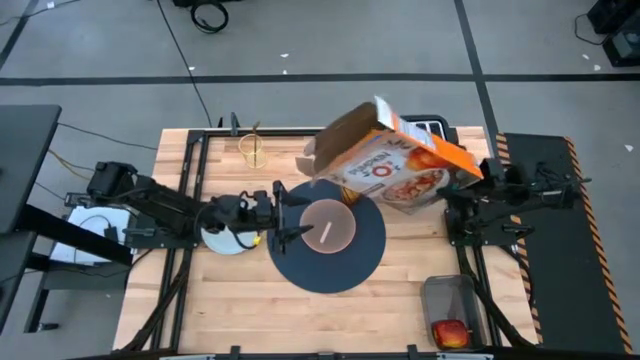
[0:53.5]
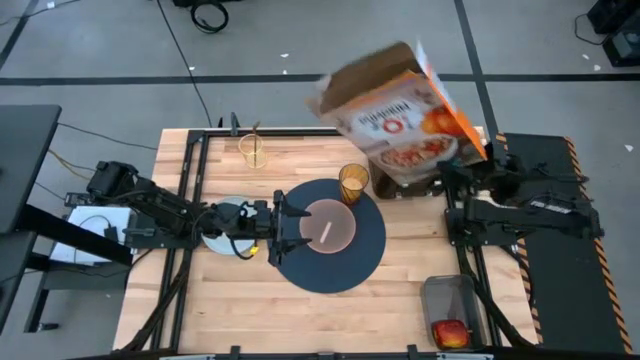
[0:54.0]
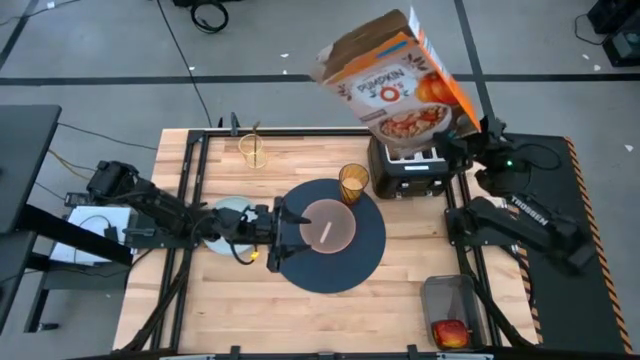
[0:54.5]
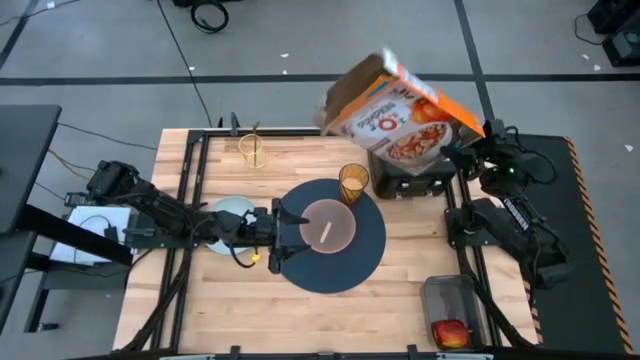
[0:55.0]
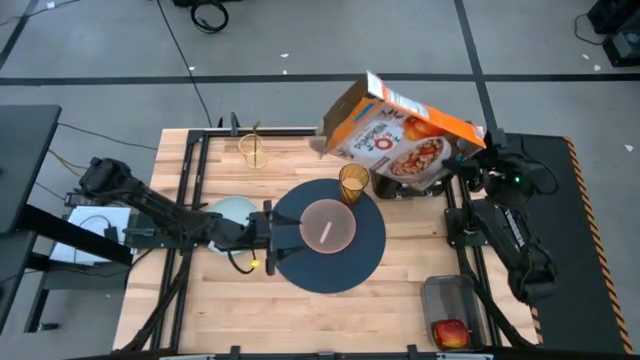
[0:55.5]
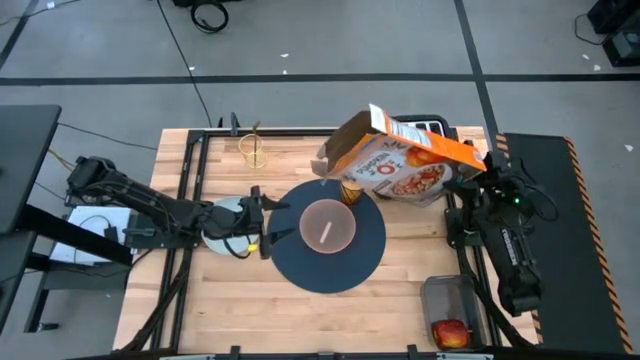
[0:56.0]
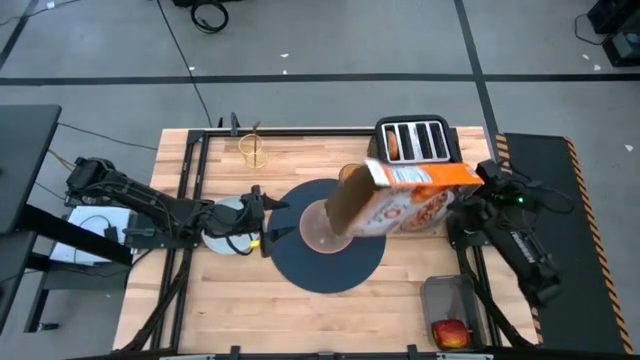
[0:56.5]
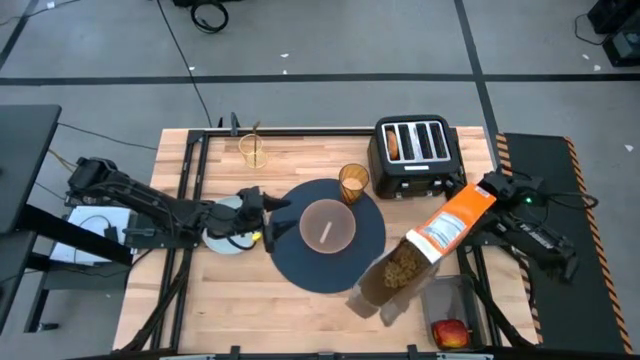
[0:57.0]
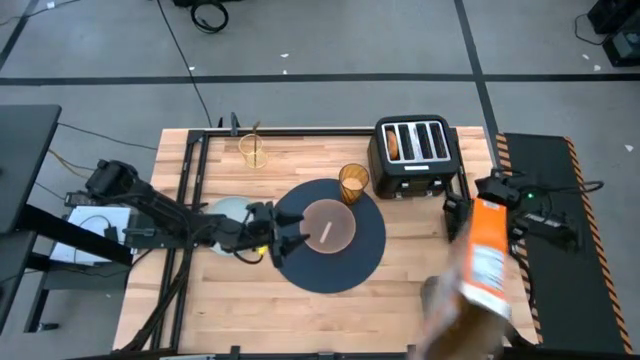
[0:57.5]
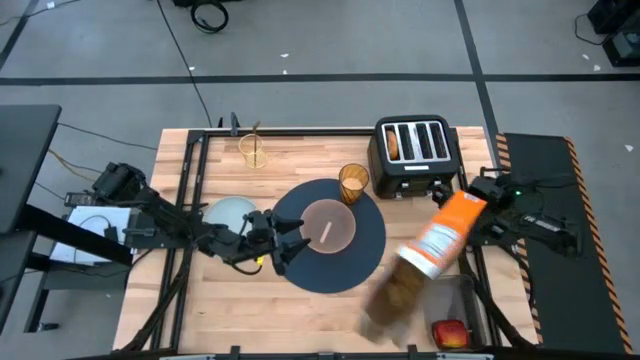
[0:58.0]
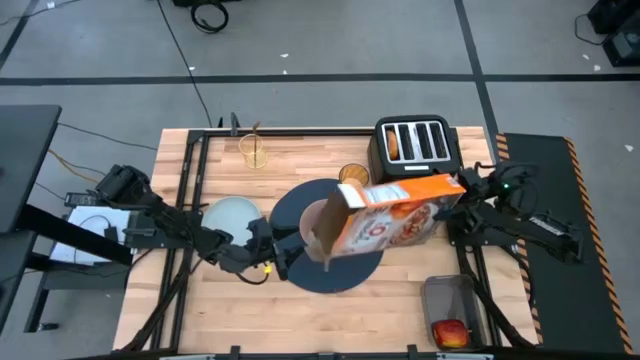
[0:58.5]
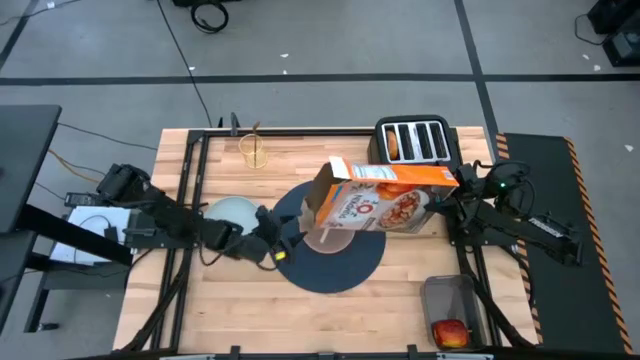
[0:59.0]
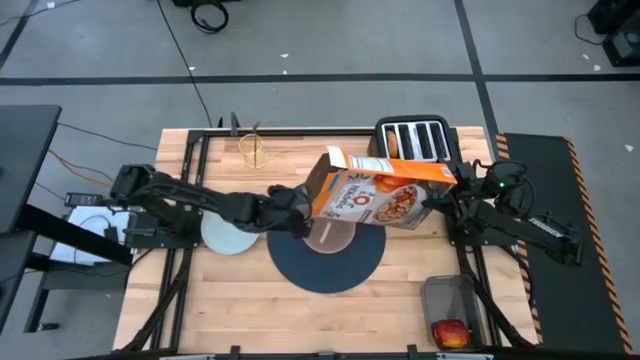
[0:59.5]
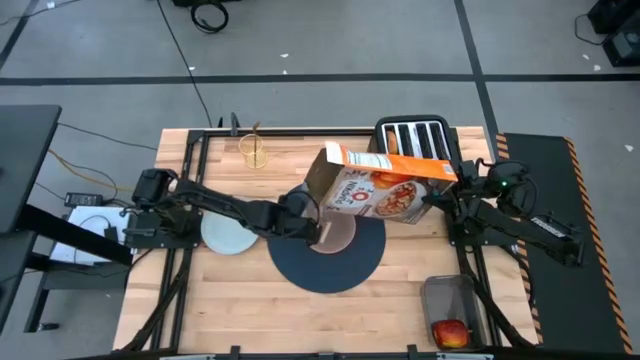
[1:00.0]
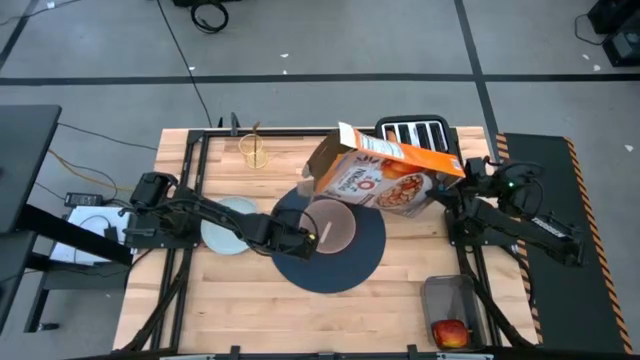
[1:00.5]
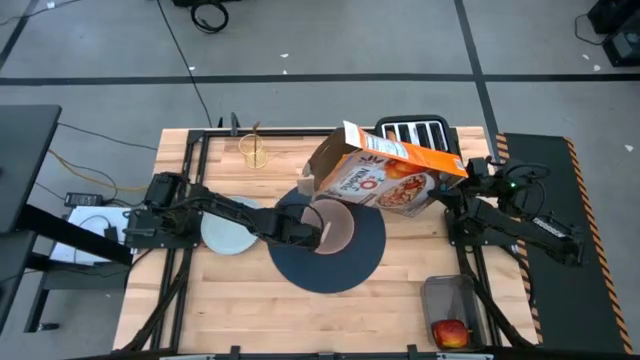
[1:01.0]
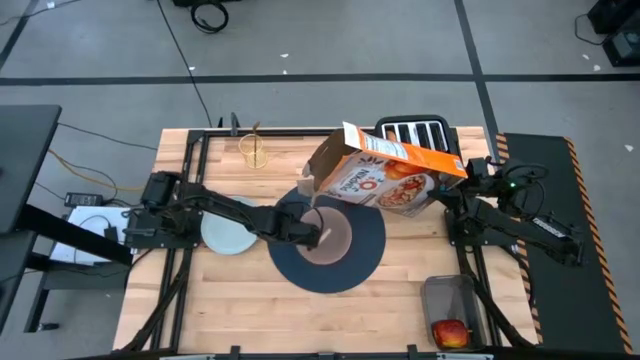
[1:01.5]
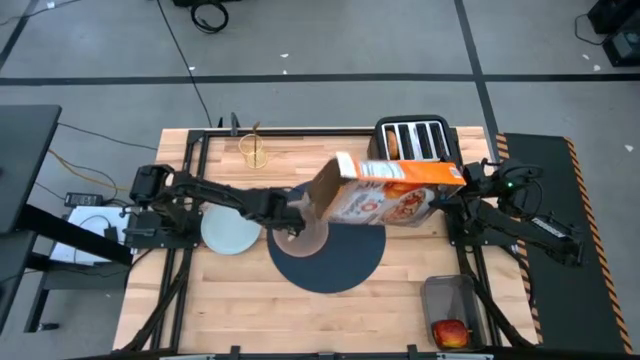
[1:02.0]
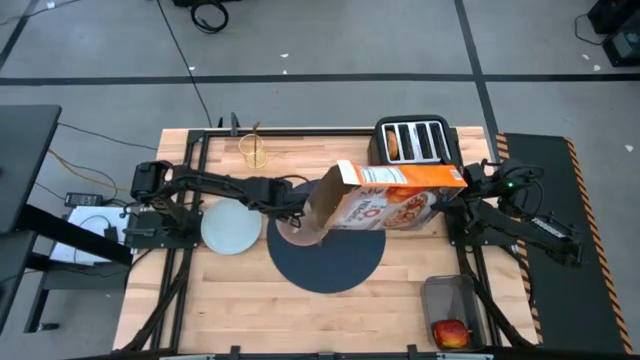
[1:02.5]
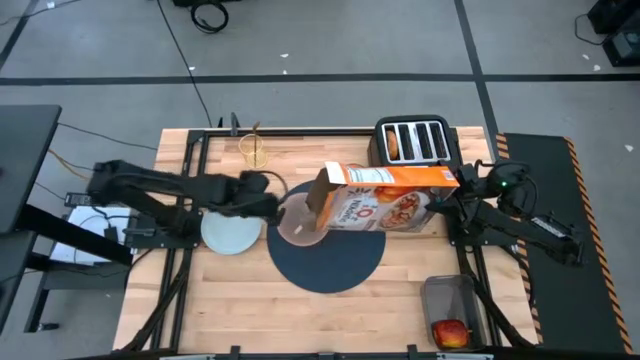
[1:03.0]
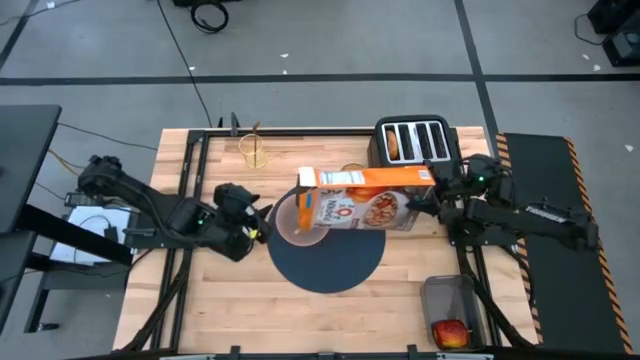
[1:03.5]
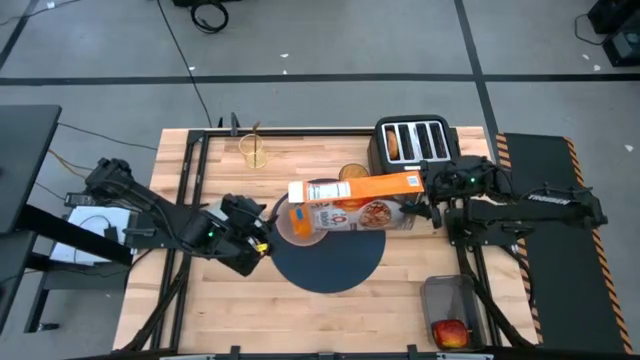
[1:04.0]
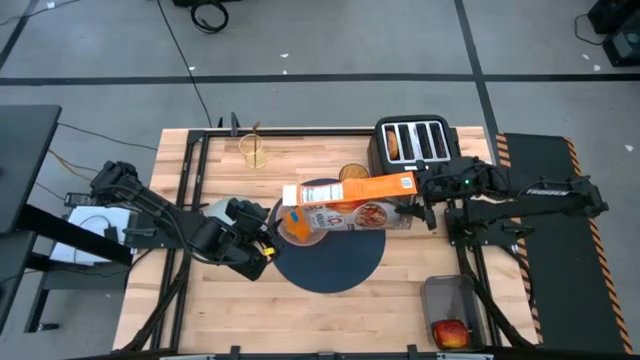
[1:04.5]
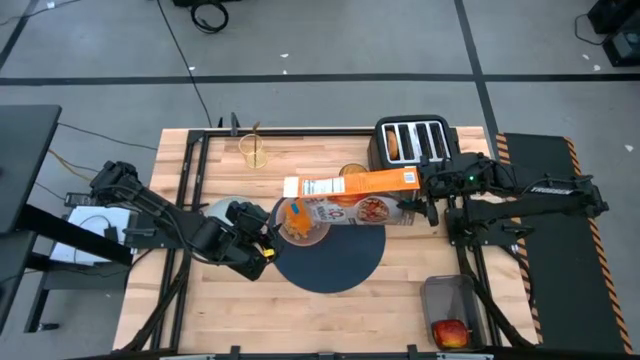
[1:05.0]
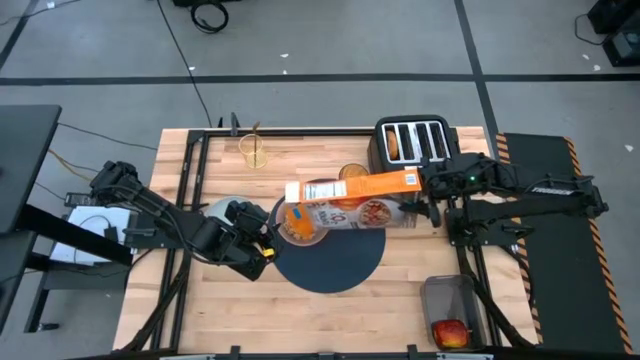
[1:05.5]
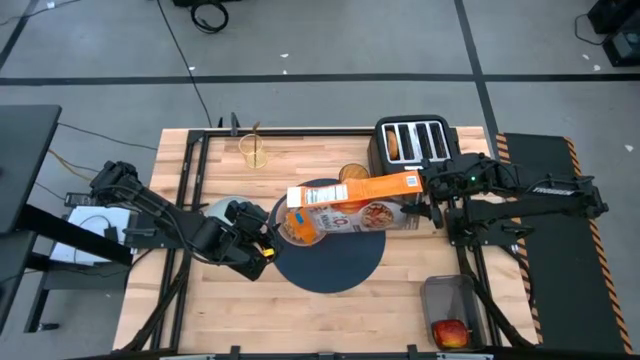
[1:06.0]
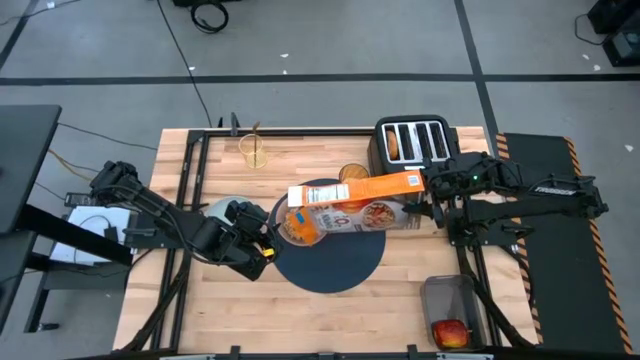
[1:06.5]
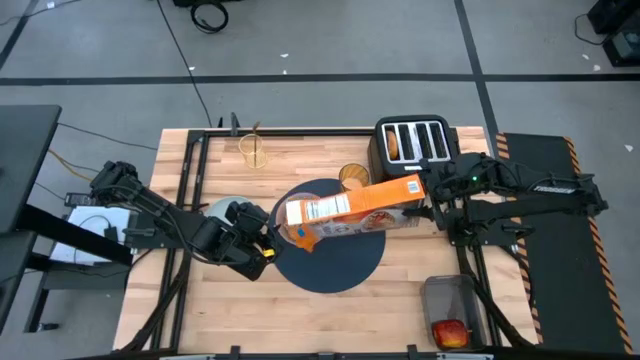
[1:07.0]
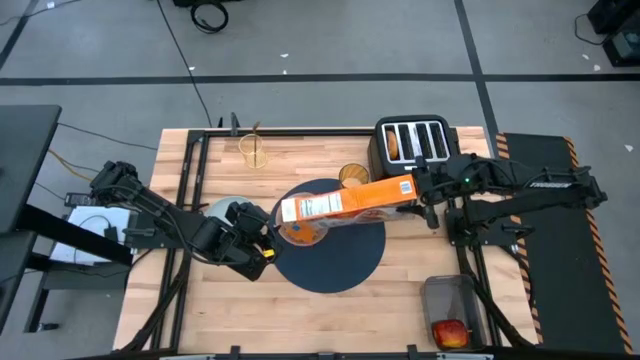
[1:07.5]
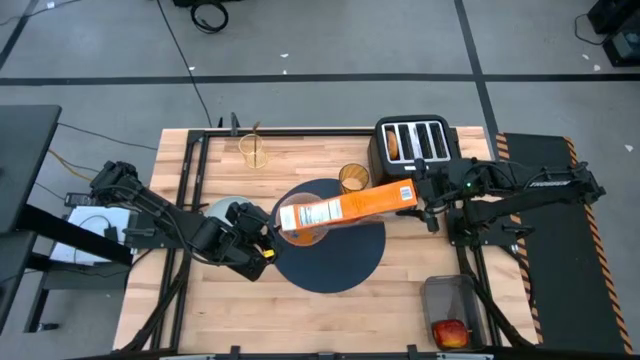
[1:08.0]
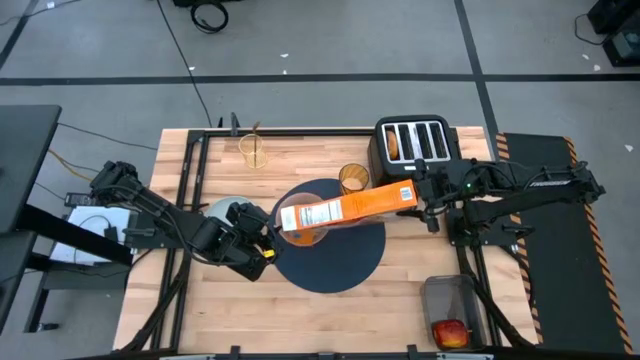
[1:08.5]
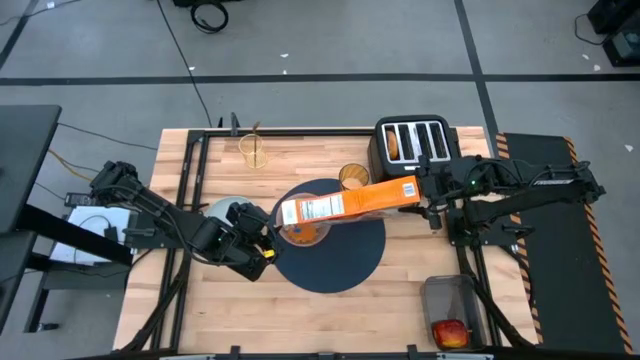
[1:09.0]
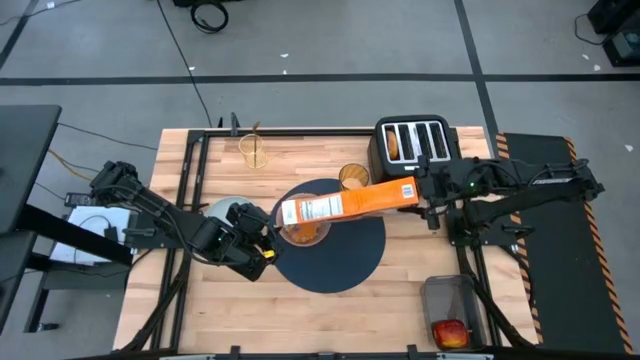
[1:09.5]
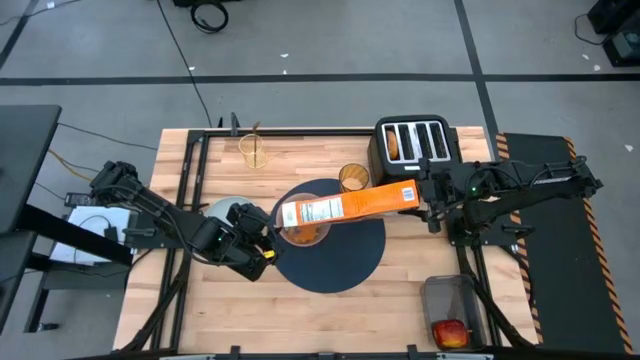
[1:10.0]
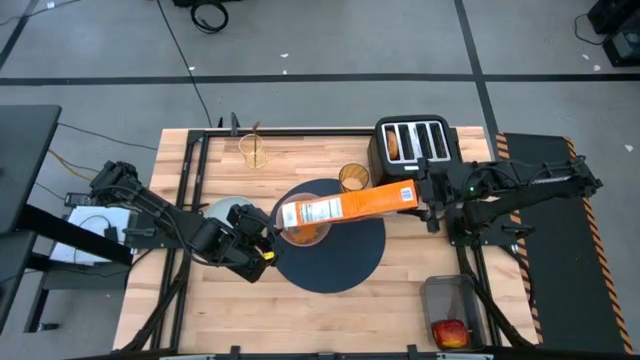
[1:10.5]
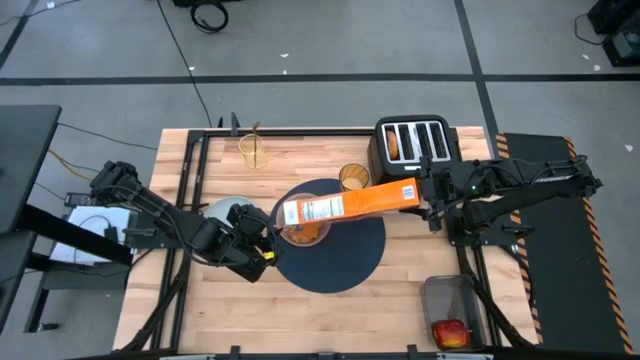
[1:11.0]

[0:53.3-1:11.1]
Task: Arrange a breakfast setting
Pour the cereal from the orange cereal box into the light orange bowl

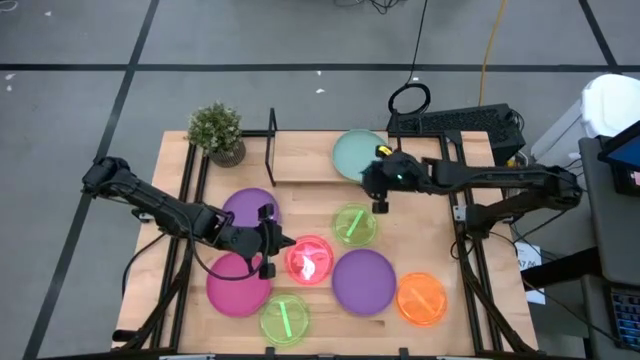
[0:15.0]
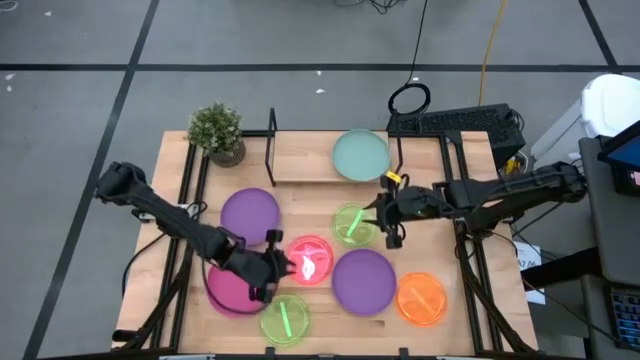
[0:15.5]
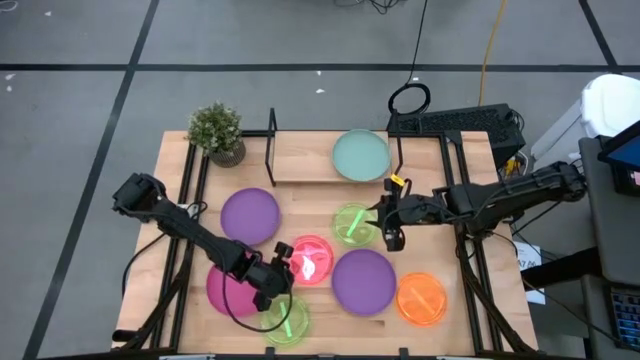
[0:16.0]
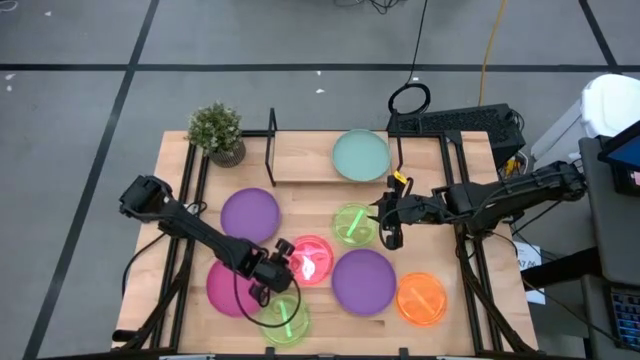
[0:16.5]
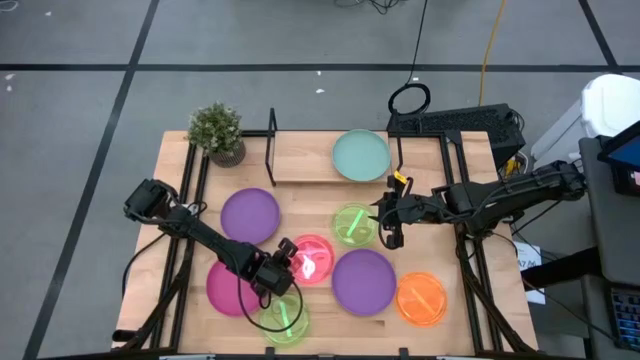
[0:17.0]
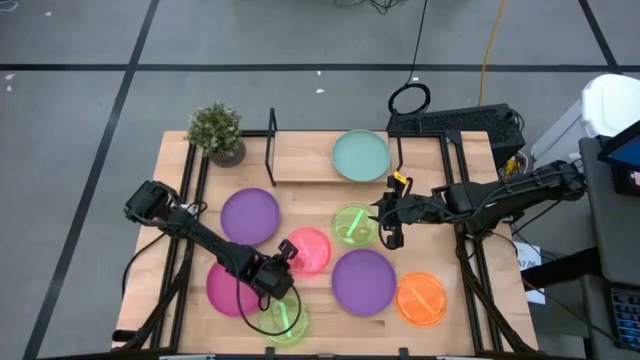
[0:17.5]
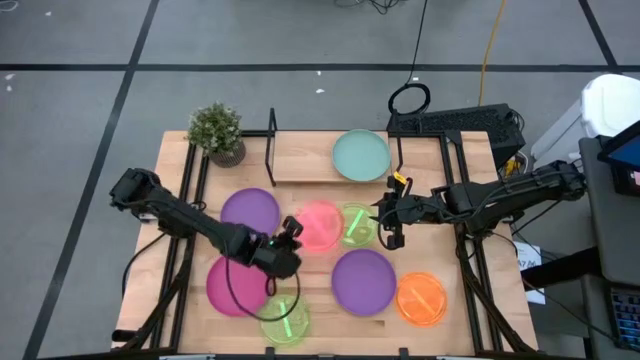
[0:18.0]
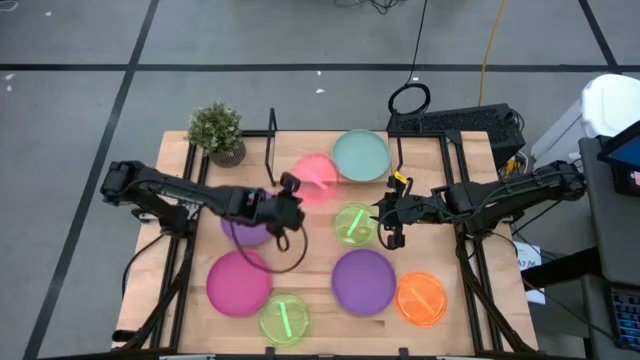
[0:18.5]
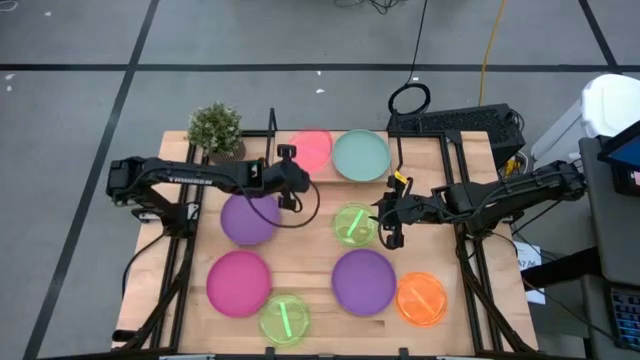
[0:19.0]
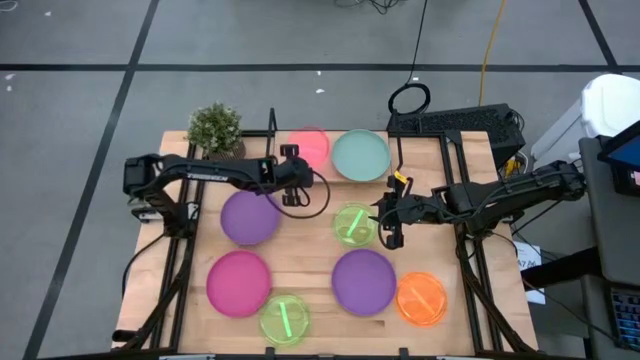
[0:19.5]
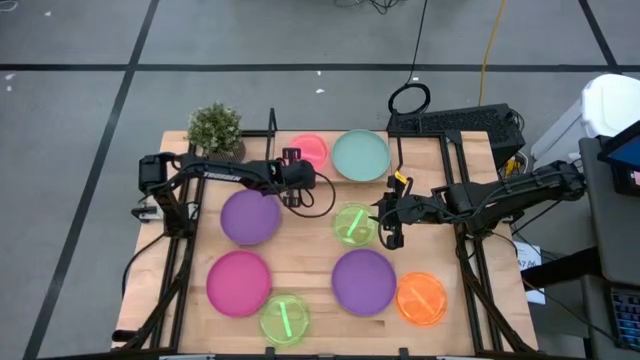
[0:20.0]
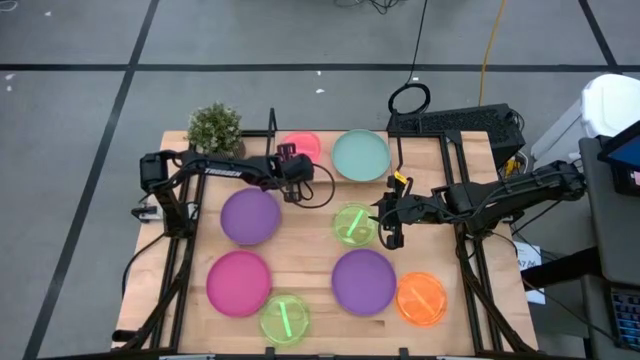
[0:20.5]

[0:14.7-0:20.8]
Task: Place and stack plates onto a shelf
Put the transparent pink plate on the shelf
